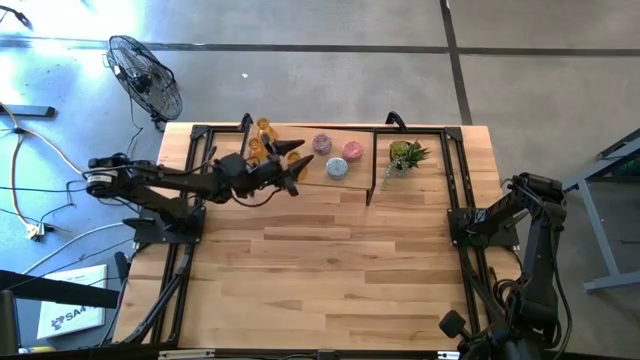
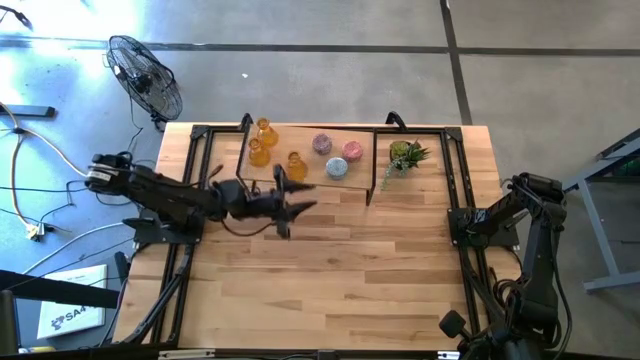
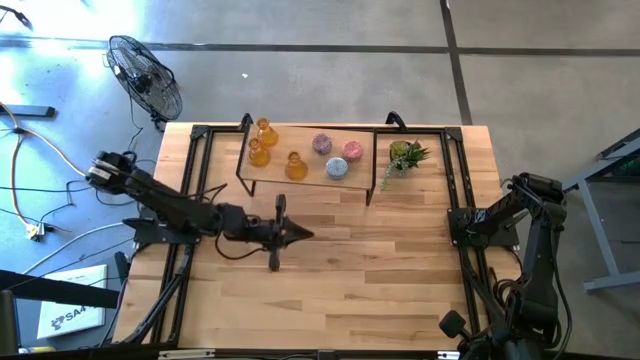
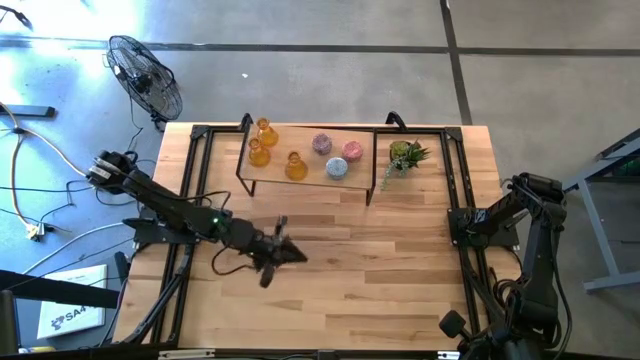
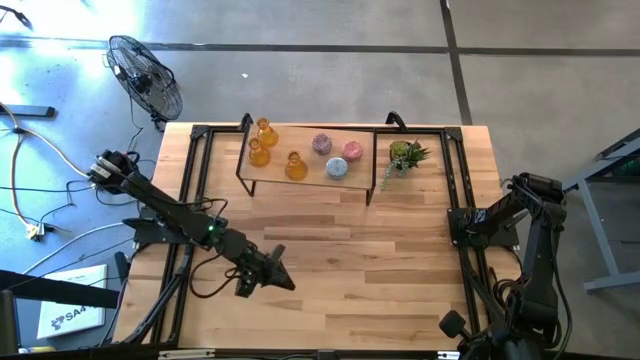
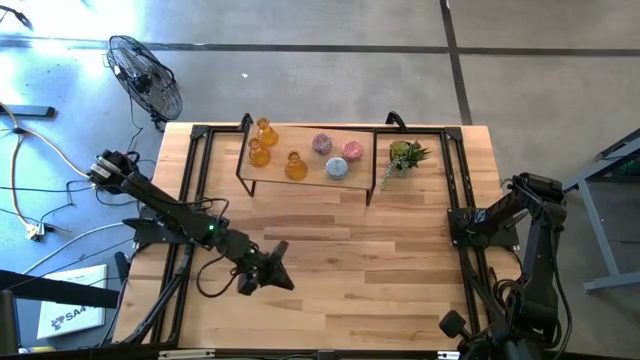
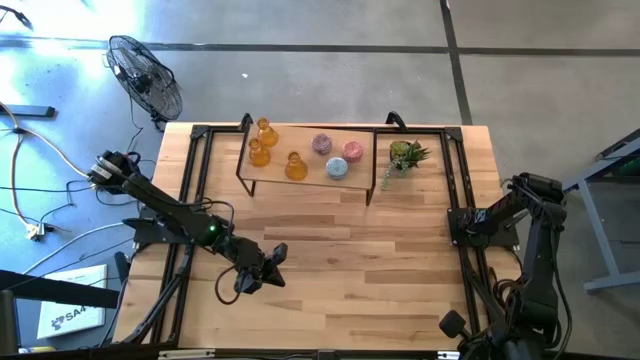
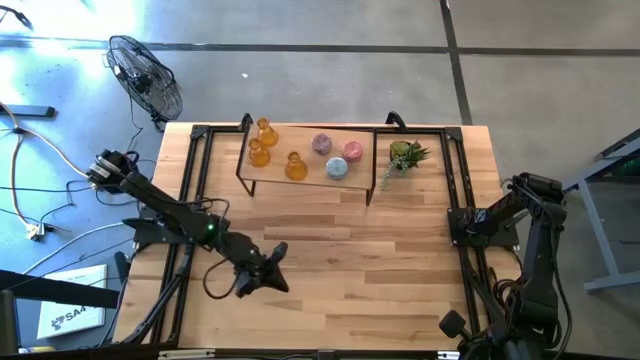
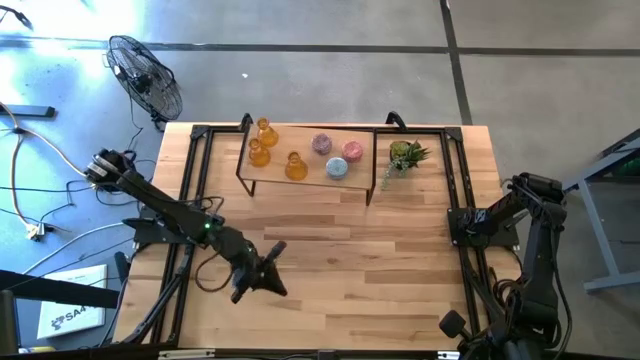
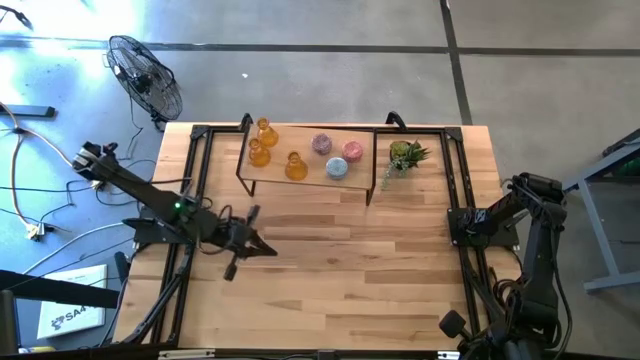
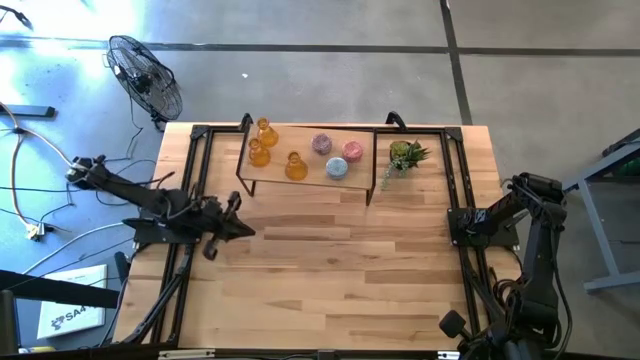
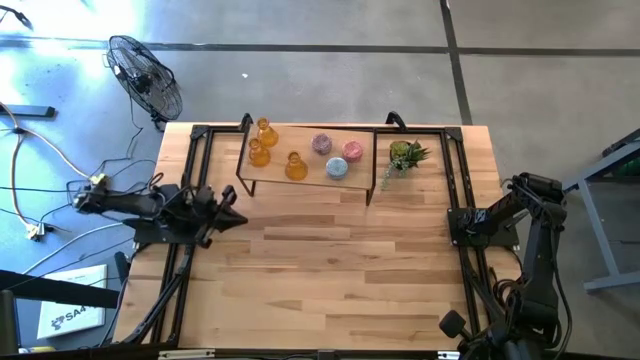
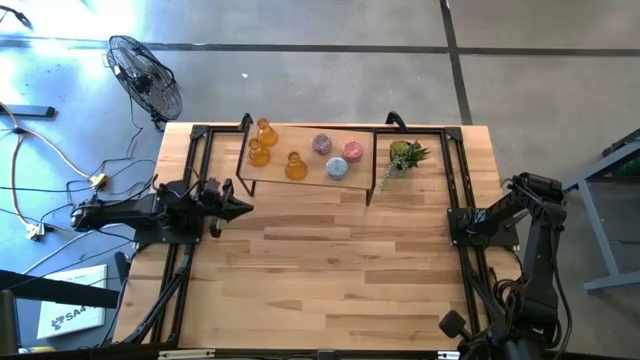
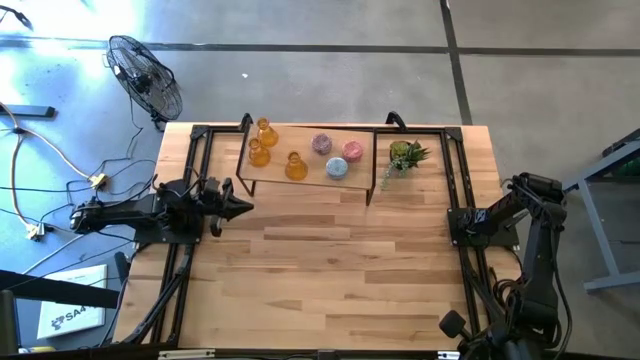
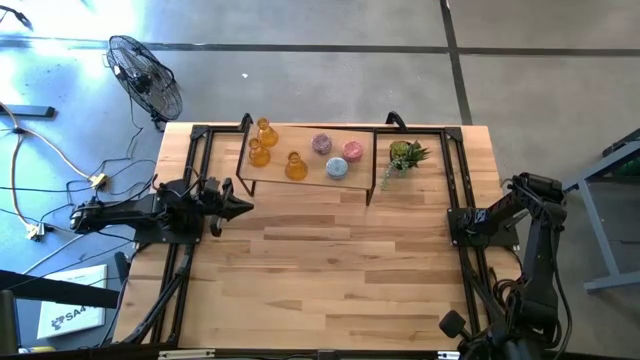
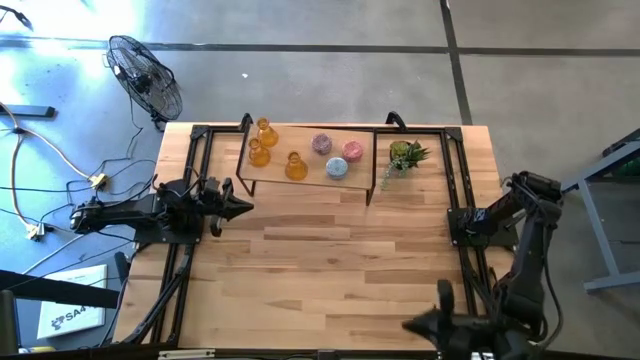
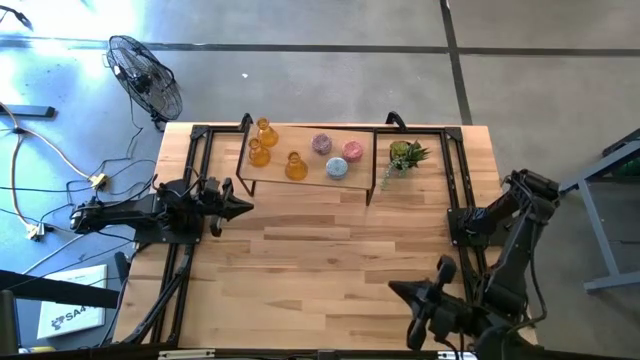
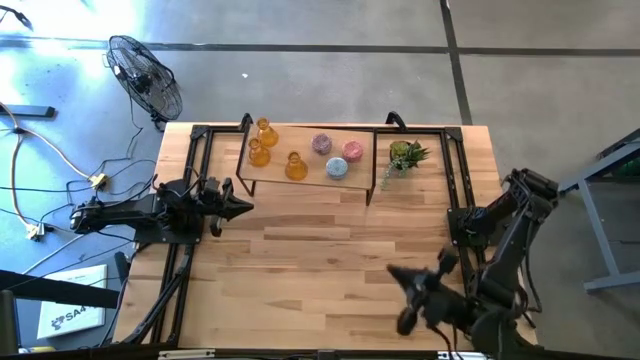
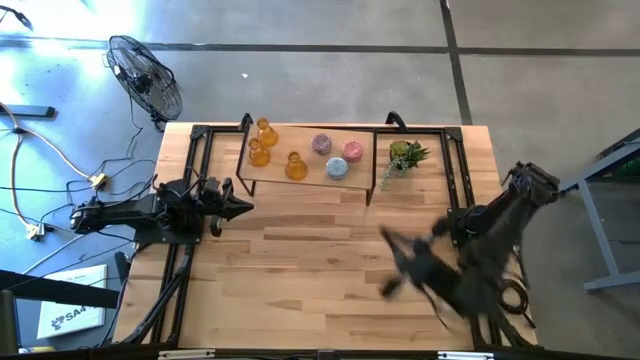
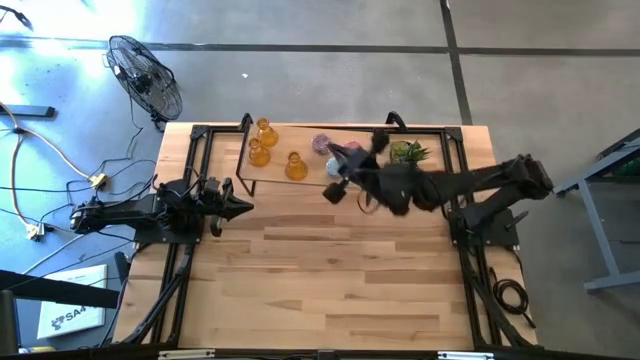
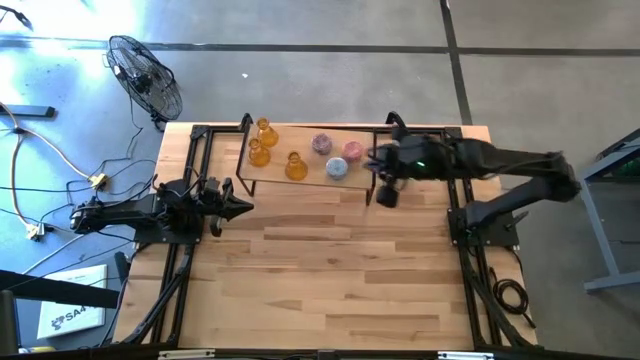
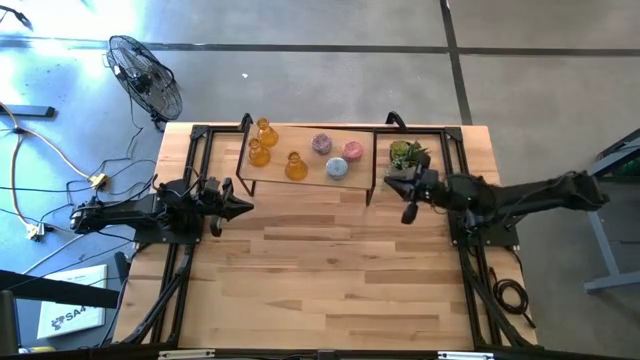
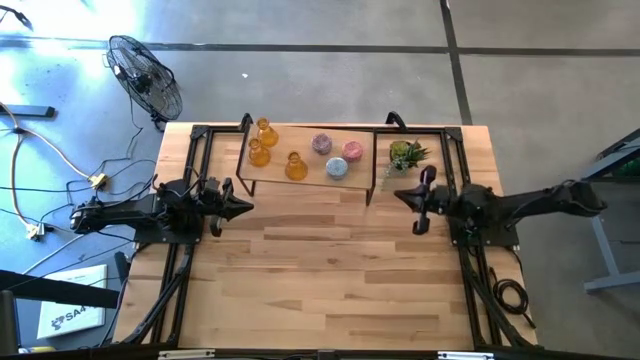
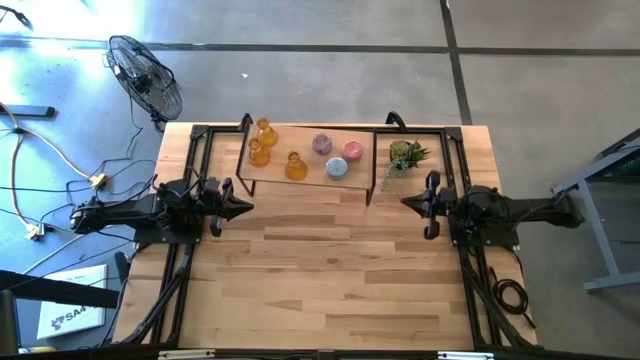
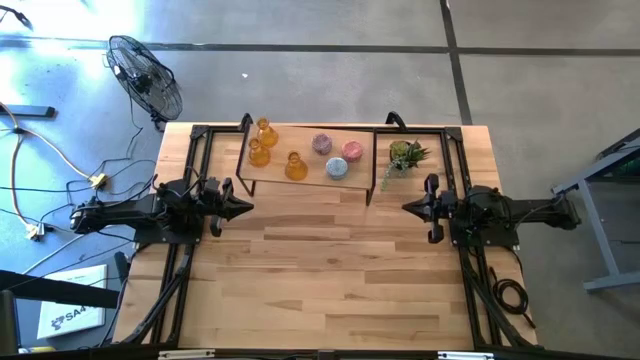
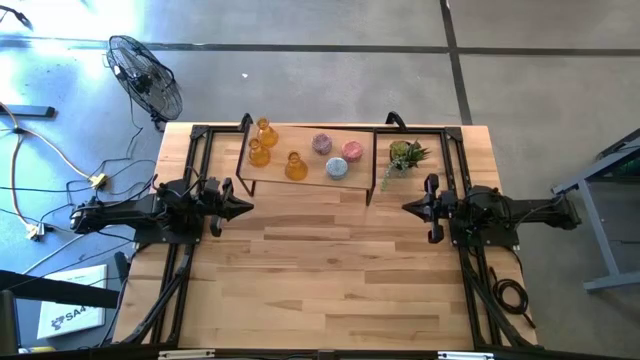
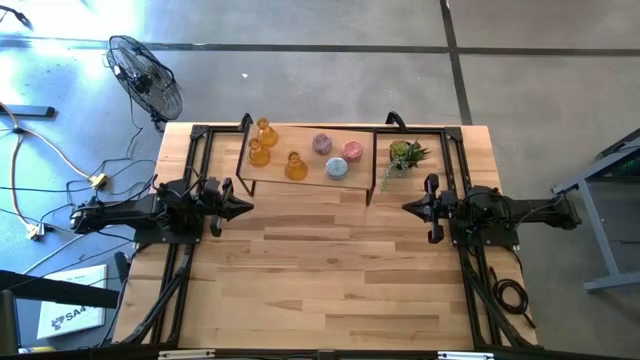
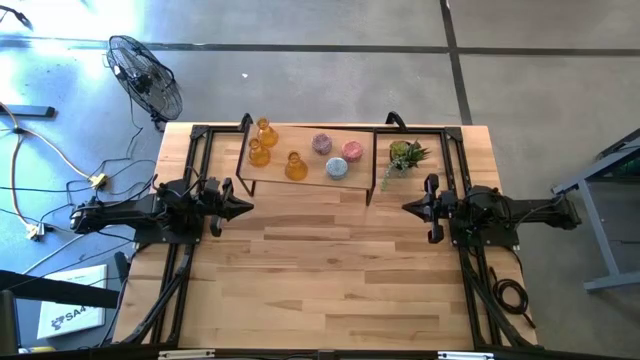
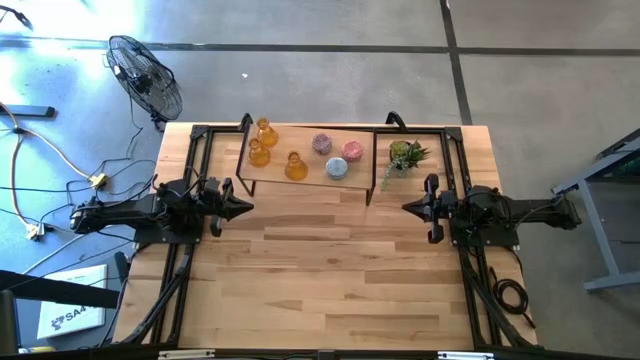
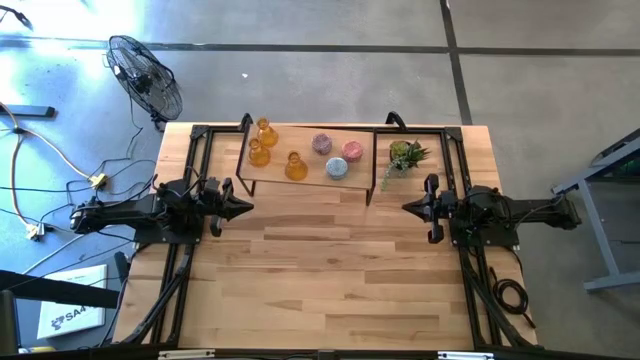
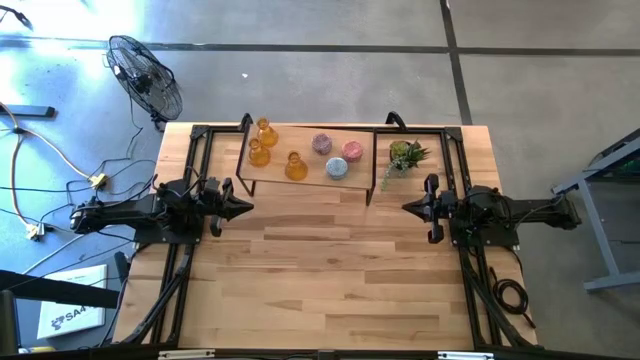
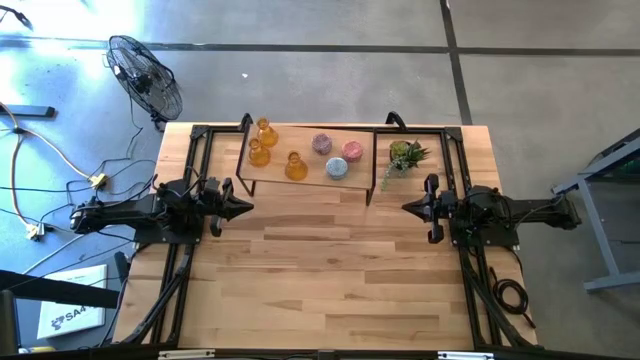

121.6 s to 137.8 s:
Task: Pick & Place candle stick holders
Return to Home Position

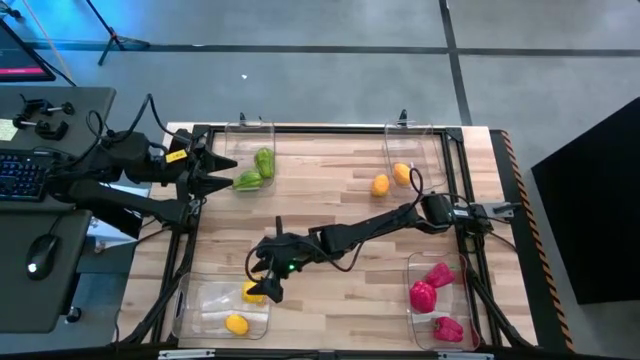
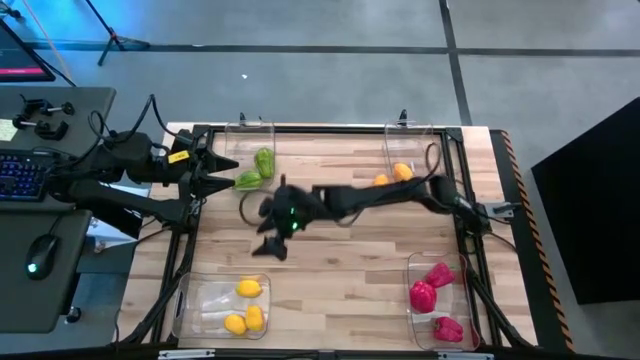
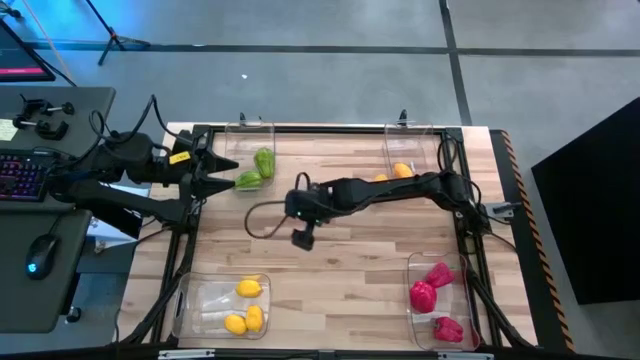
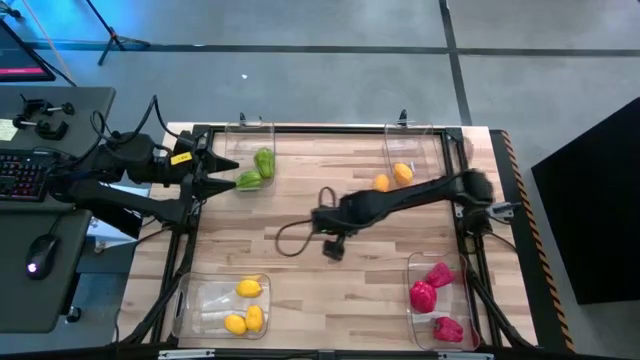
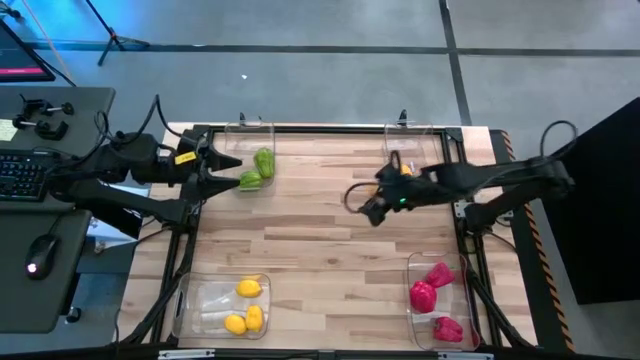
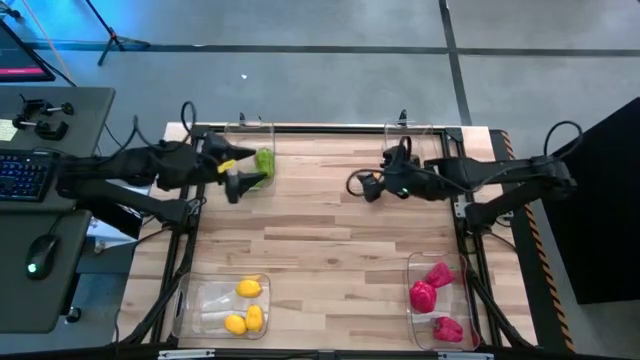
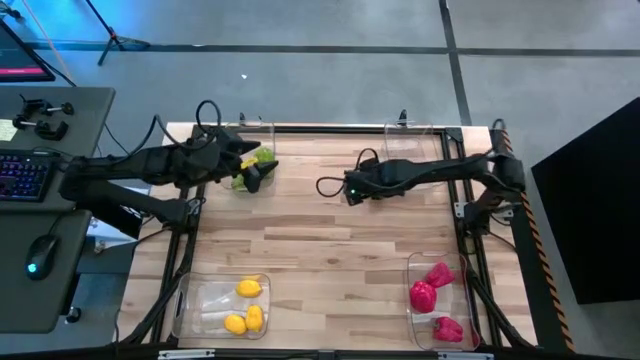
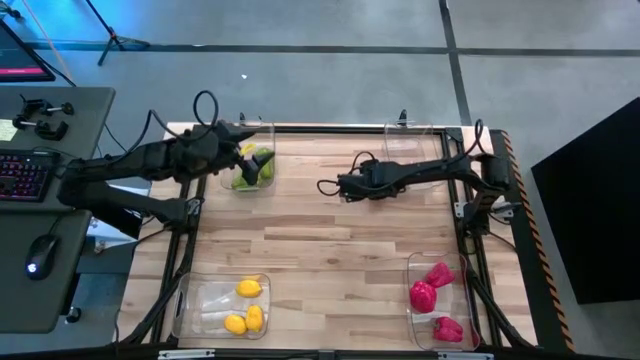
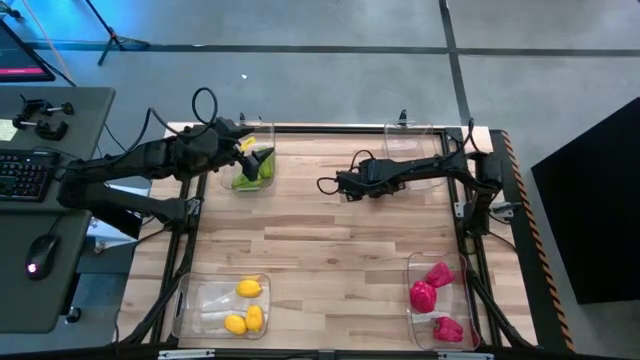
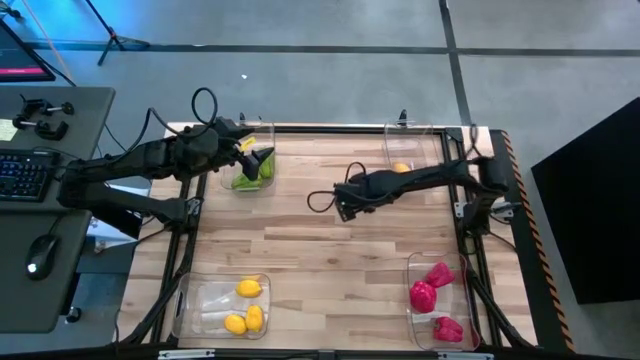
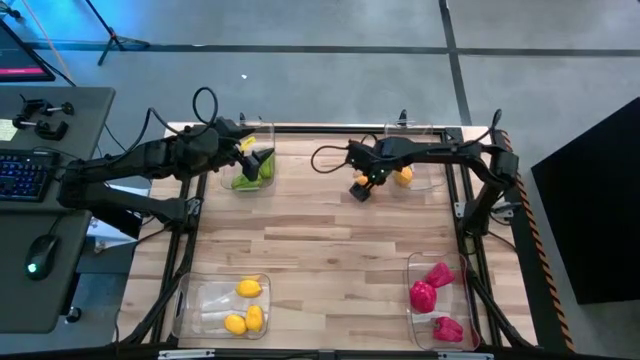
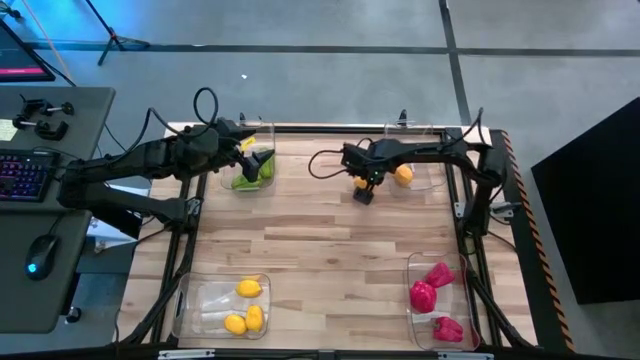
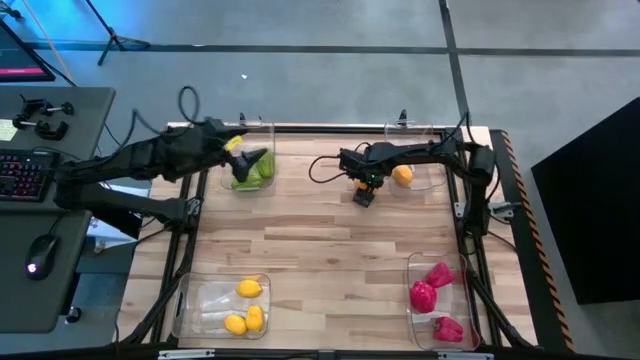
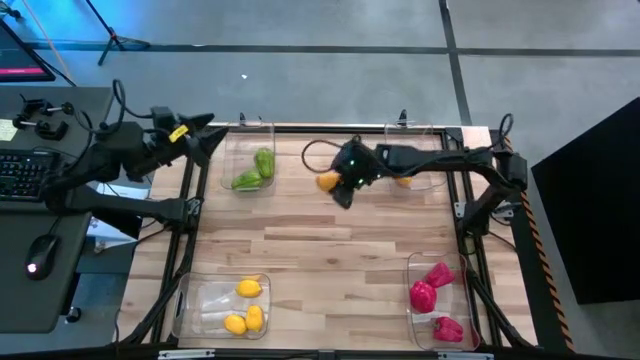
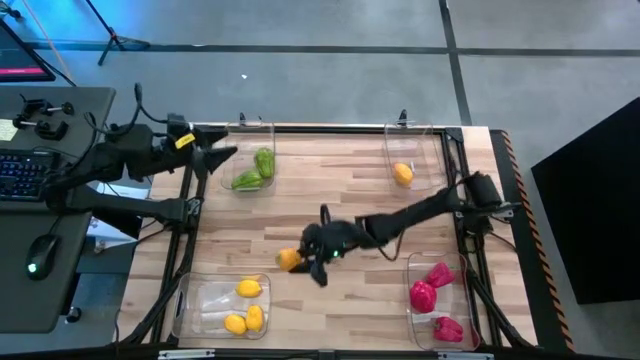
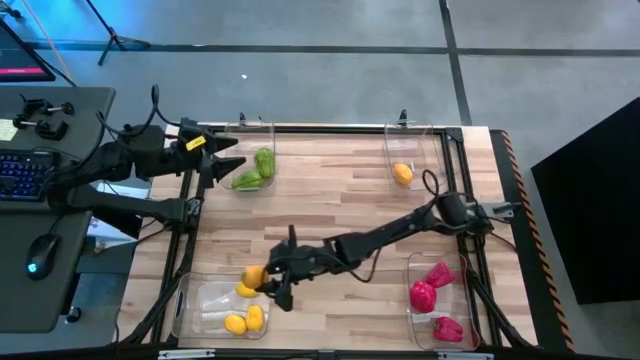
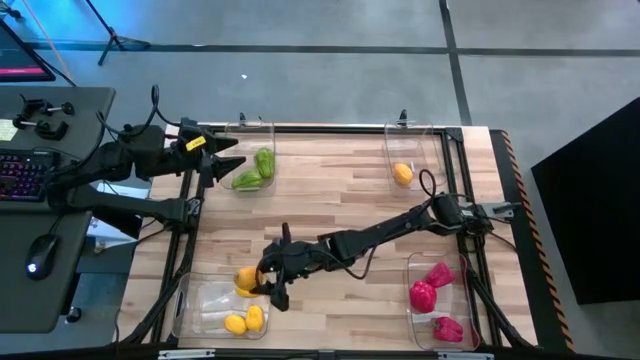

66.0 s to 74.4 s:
Task: Sort produce into baskets
Put the lemon into the bottom left transparent bin
